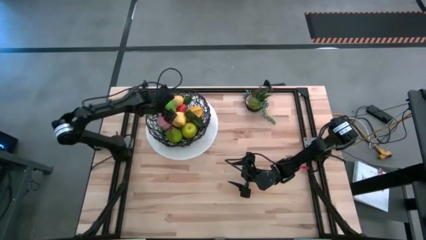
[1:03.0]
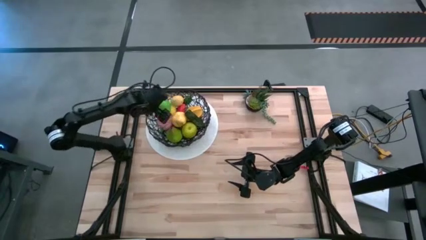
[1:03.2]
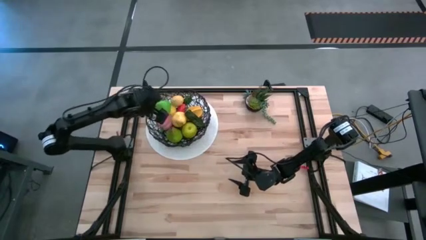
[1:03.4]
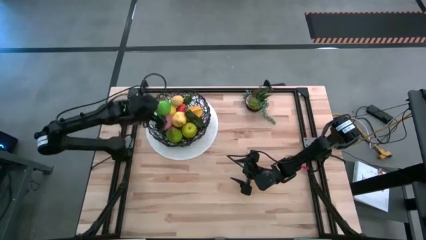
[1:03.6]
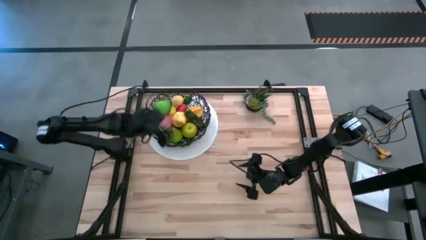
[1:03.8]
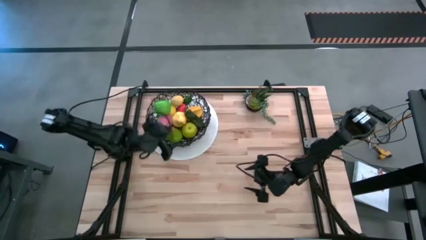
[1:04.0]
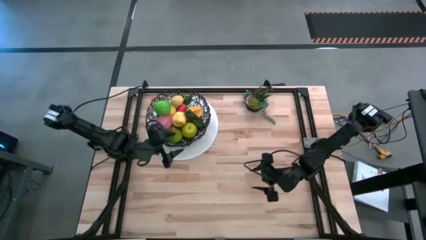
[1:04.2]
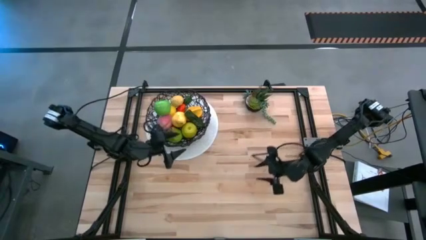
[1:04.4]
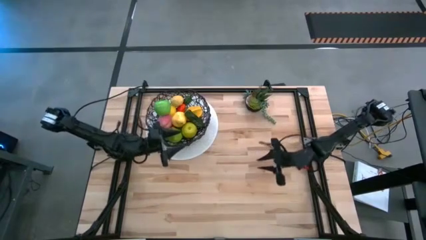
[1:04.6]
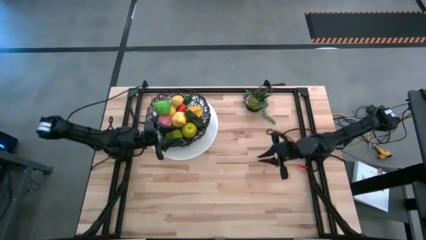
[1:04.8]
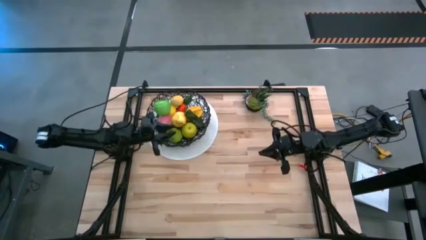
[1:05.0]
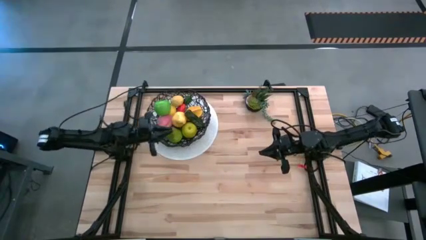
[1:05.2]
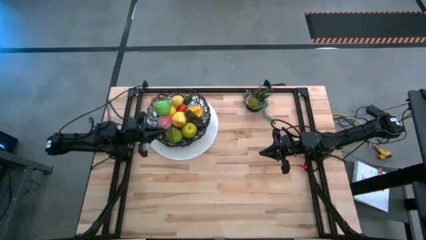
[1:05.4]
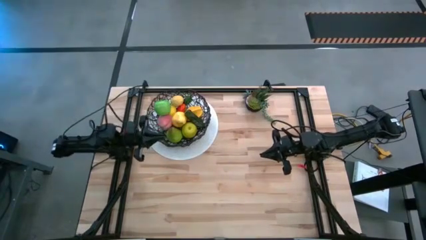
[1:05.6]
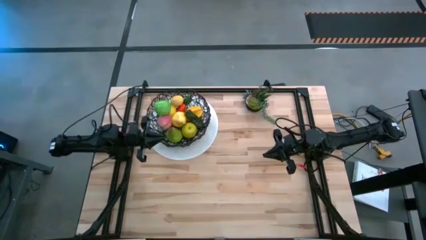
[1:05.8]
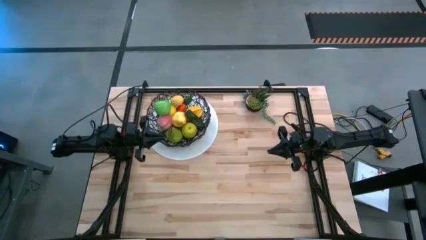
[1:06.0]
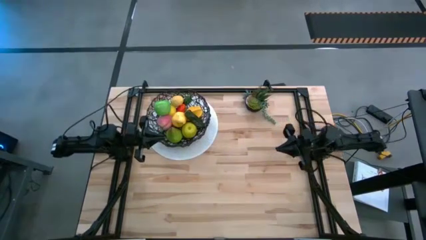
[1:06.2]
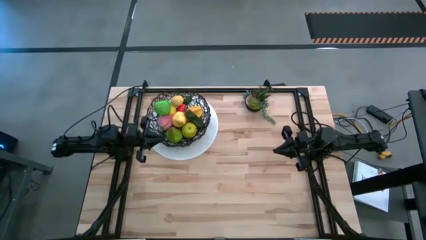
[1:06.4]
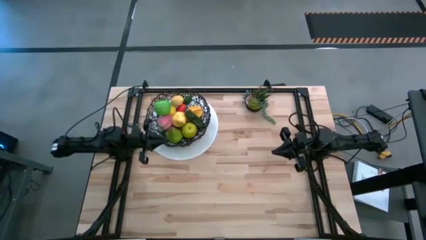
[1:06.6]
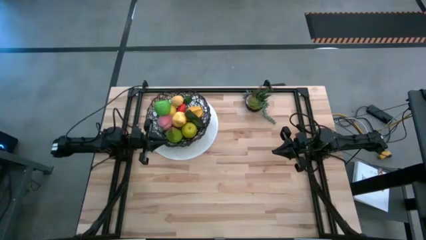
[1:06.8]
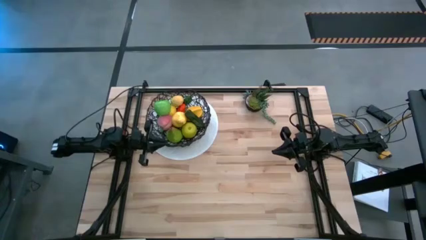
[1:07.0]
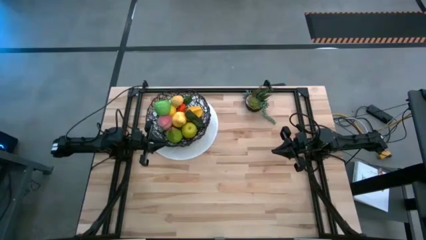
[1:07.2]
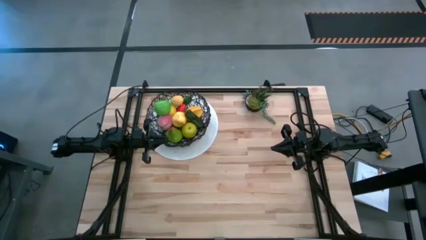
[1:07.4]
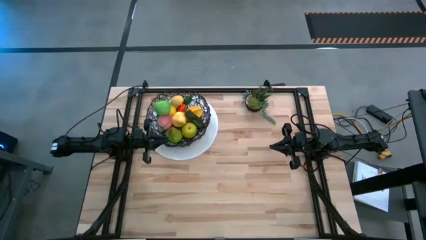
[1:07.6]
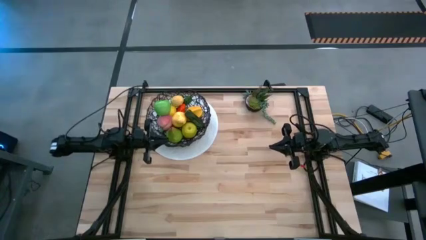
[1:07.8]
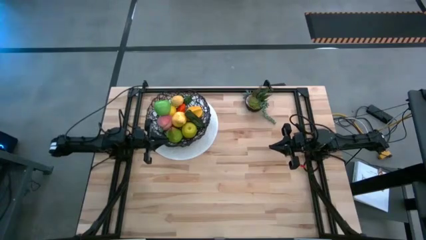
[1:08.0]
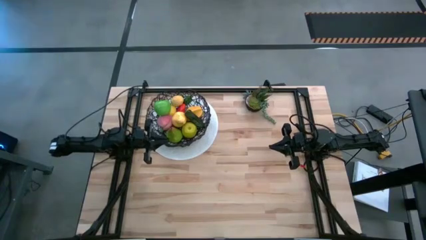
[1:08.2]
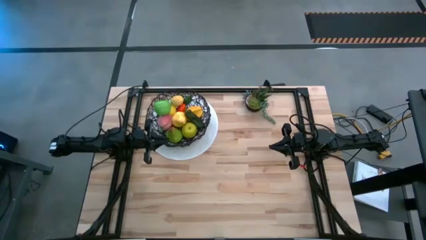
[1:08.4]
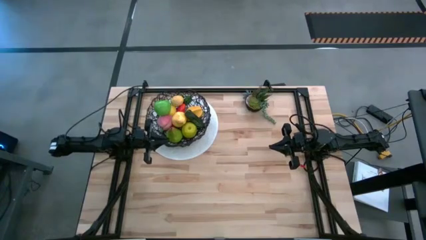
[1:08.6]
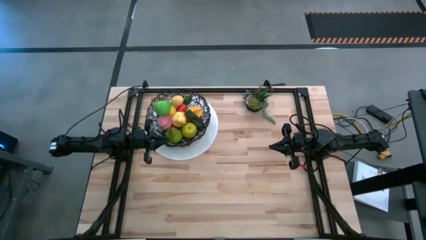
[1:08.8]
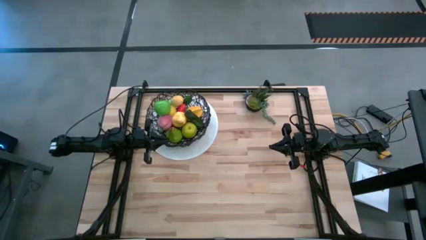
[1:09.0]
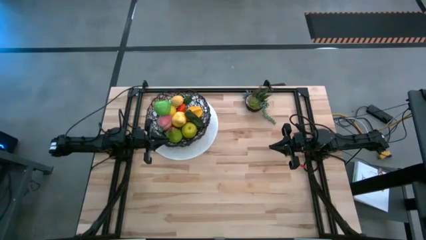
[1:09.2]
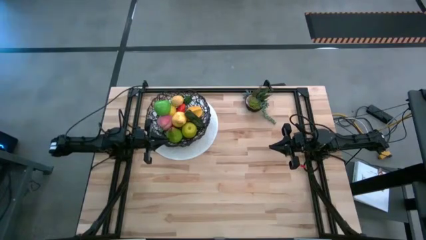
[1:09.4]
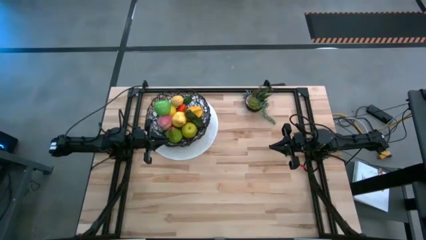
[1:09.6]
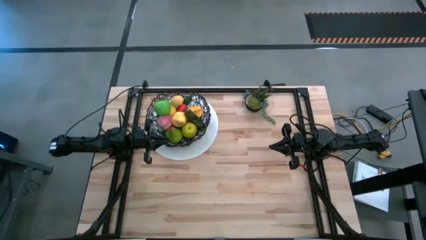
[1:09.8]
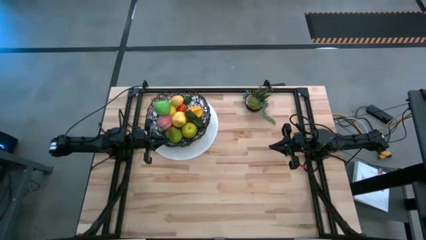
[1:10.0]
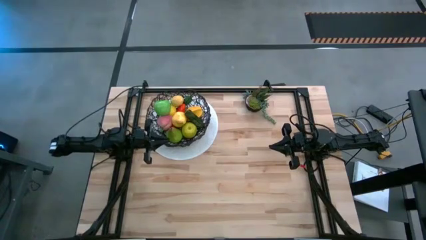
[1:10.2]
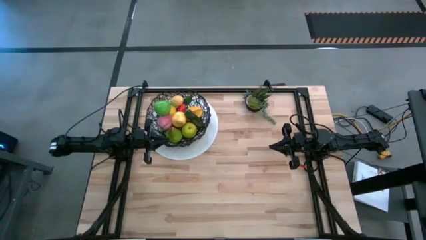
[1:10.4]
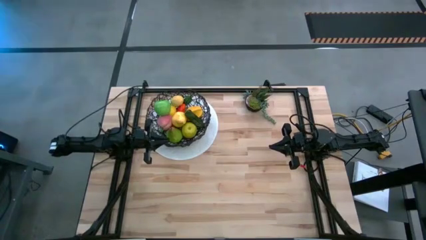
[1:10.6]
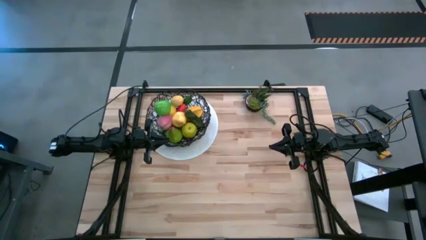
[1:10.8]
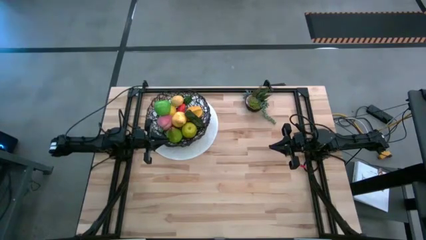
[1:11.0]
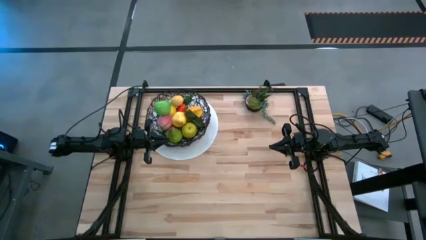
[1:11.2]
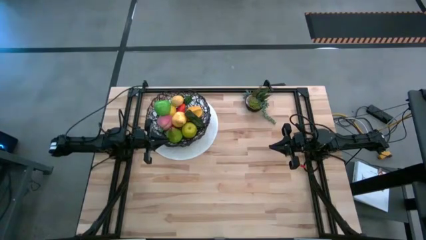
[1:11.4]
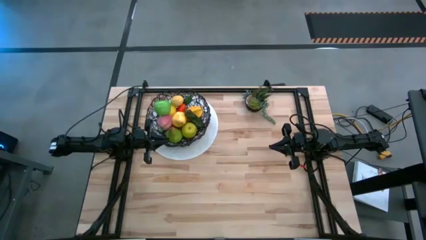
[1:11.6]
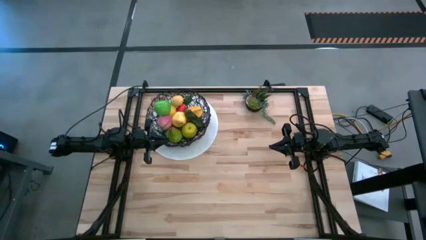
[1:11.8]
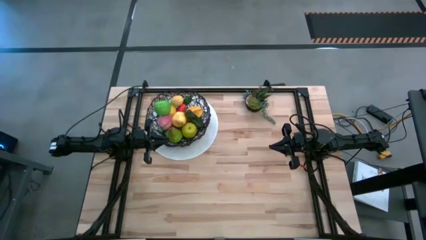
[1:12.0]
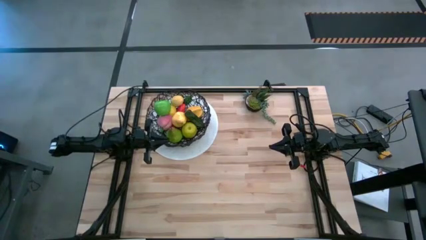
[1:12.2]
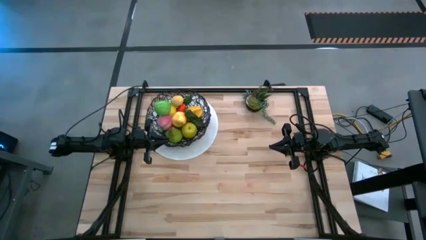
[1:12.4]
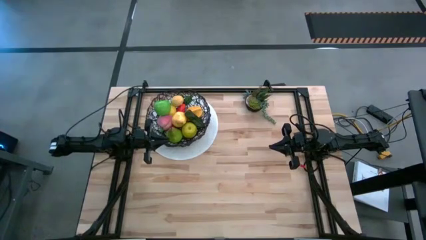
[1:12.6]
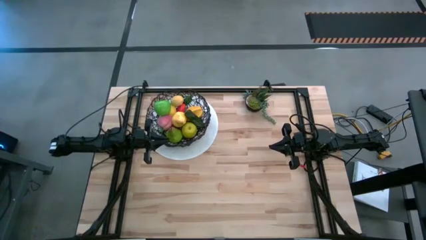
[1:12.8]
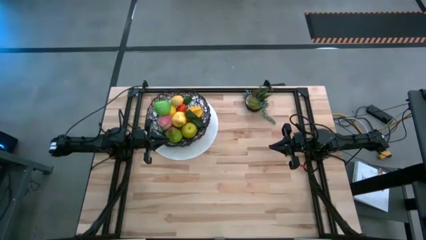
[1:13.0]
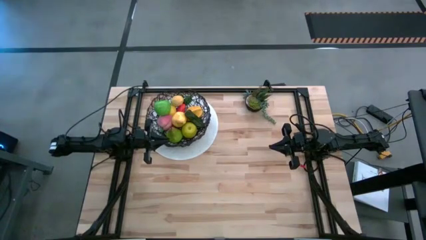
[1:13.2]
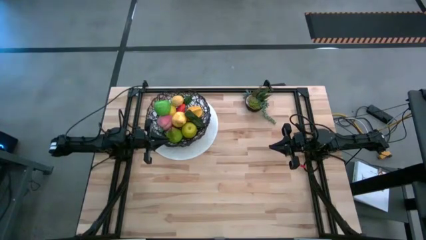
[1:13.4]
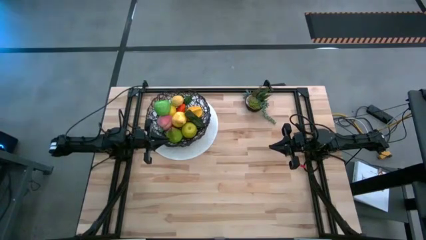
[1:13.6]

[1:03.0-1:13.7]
Task: Build produce basket
Return to Home Position
